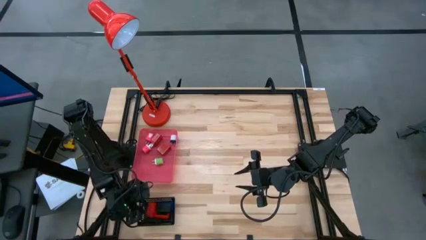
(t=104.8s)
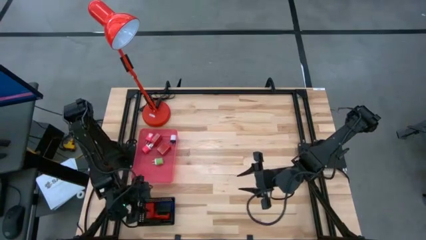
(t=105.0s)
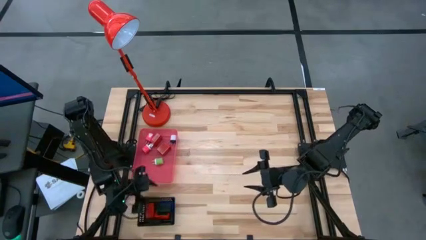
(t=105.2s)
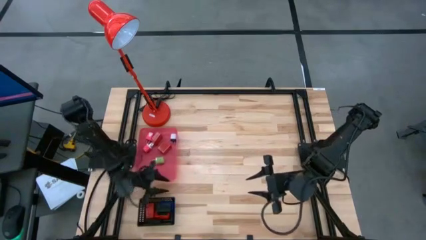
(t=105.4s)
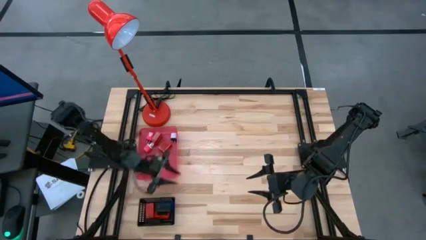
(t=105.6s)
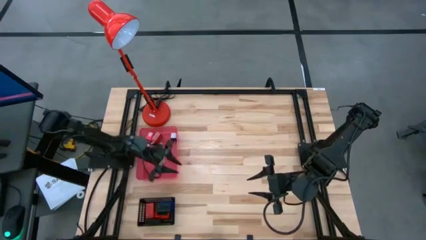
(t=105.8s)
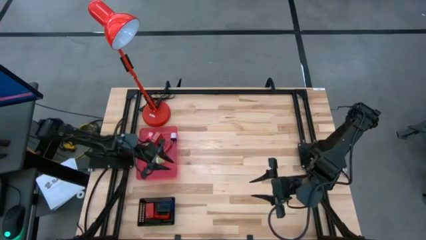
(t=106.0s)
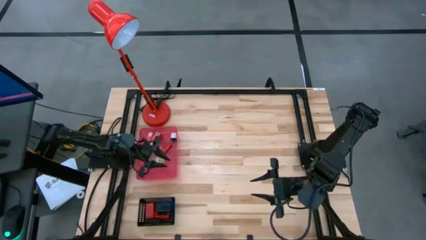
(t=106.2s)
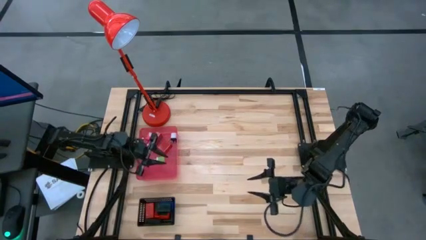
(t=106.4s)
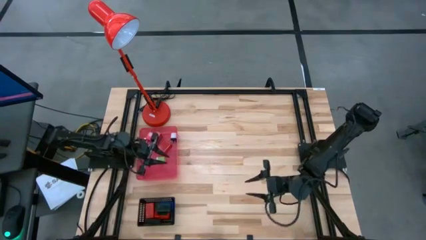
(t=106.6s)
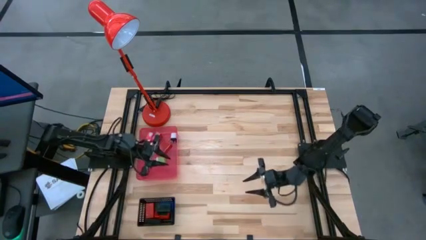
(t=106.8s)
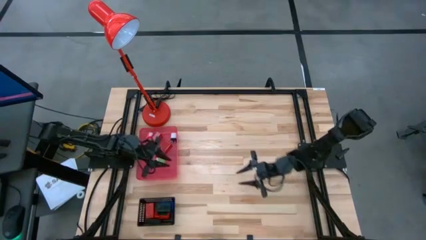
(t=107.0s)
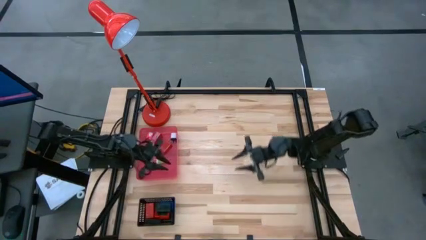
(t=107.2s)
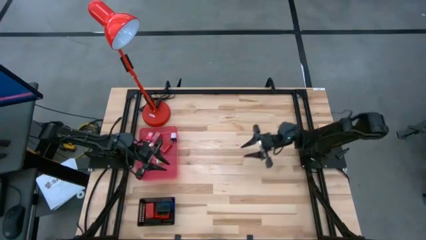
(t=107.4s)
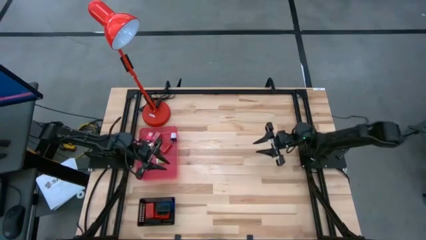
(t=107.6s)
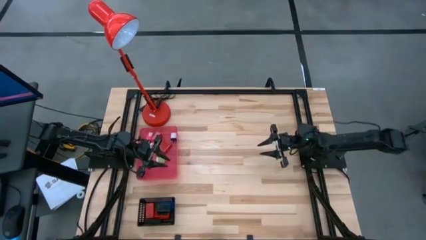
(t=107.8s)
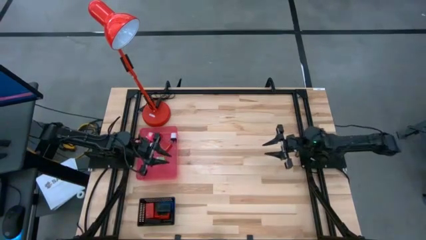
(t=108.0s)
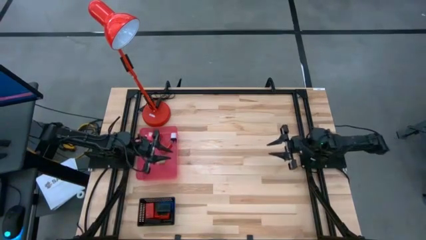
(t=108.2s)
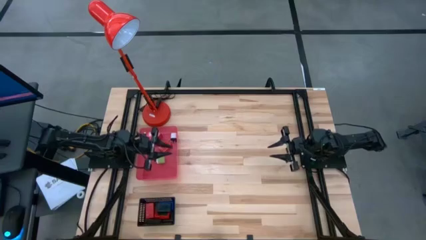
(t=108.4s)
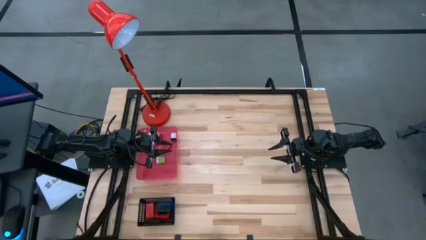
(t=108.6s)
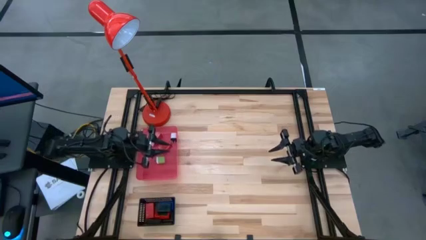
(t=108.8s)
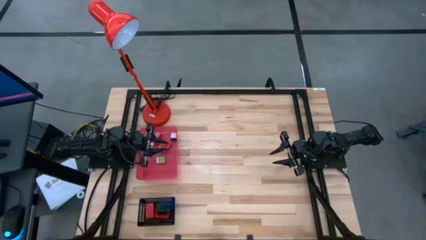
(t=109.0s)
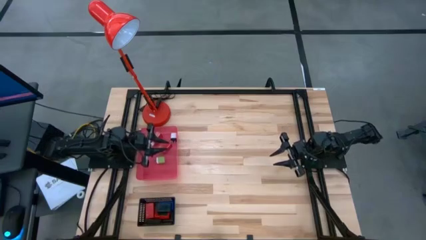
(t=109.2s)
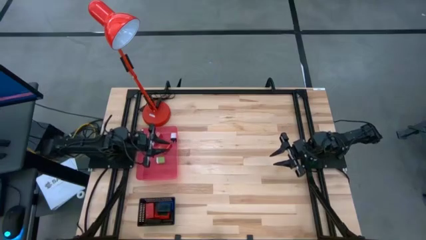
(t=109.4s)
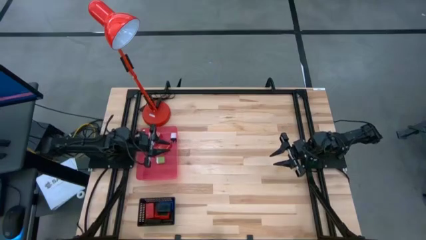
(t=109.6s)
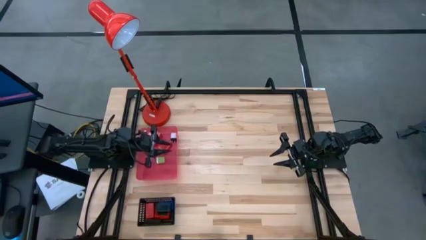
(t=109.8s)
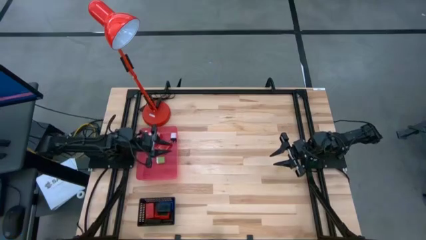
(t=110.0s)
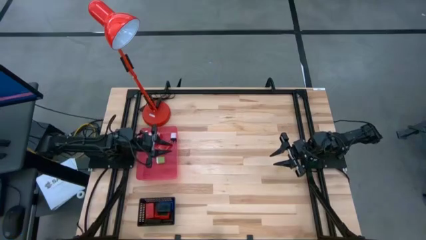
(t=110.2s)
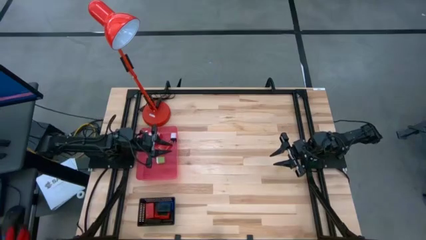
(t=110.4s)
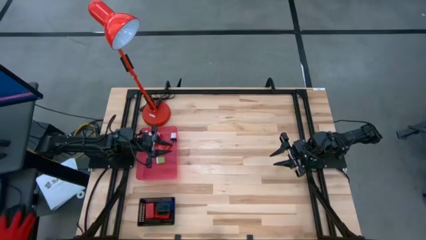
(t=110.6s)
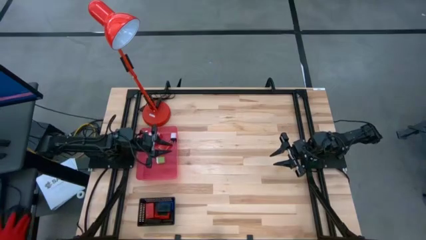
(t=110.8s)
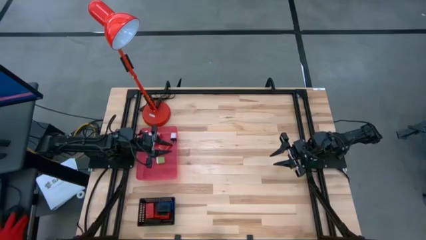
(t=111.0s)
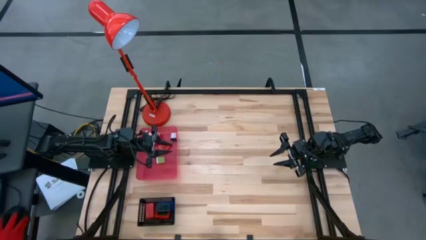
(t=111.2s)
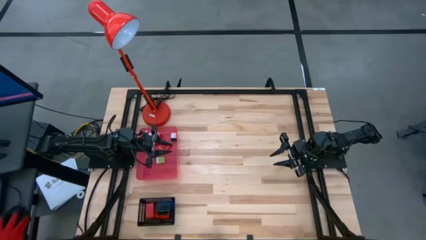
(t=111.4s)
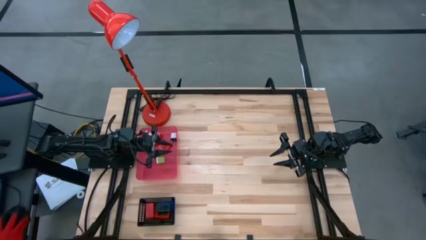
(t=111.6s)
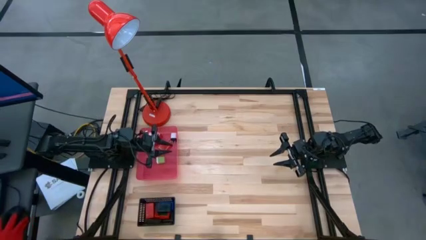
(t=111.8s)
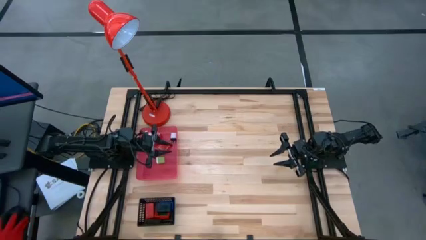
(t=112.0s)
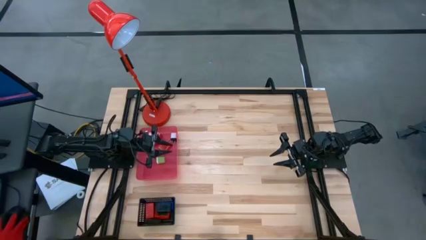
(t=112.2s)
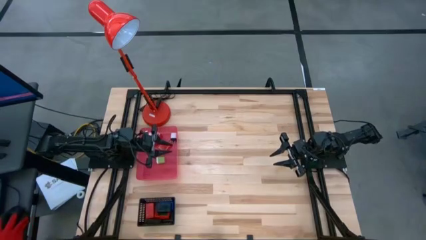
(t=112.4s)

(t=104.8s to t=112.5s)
Task: Pick & Place Office items
Return to Home Position

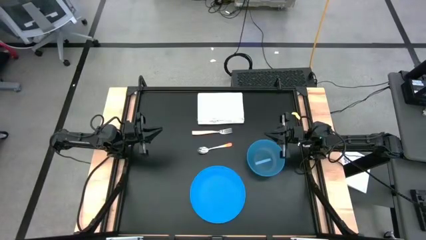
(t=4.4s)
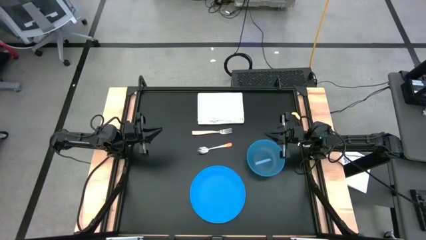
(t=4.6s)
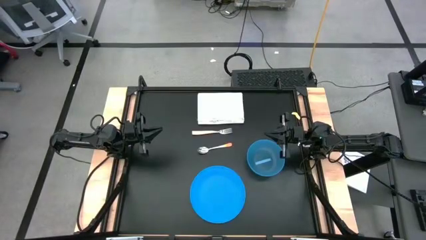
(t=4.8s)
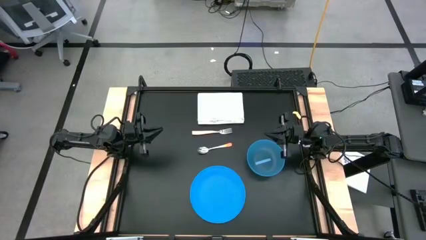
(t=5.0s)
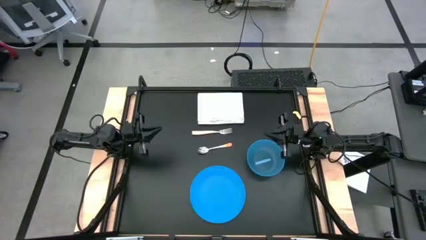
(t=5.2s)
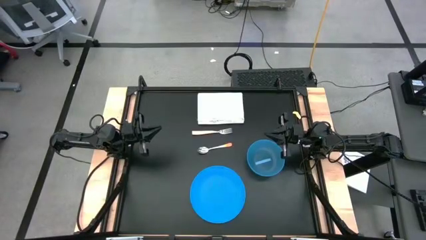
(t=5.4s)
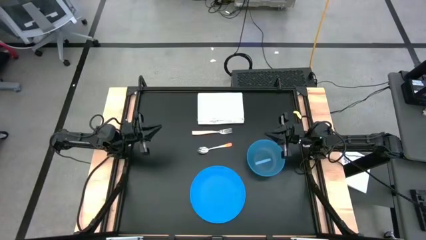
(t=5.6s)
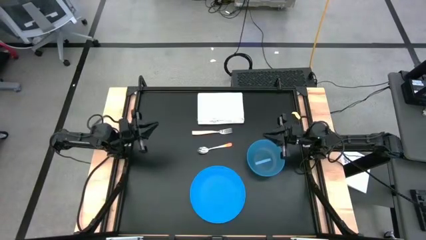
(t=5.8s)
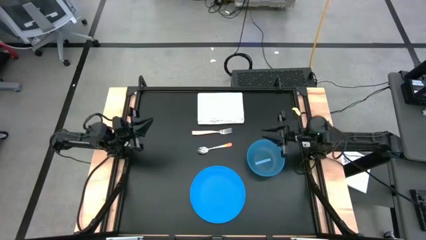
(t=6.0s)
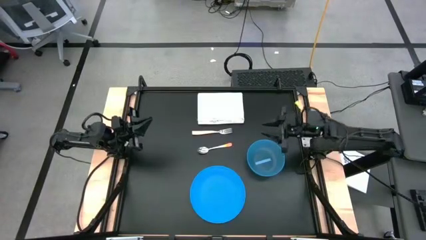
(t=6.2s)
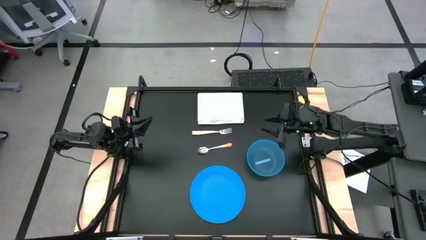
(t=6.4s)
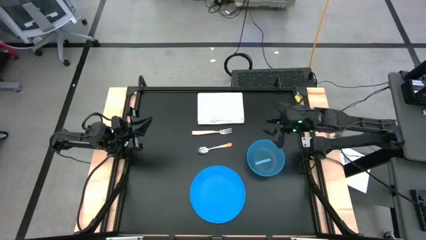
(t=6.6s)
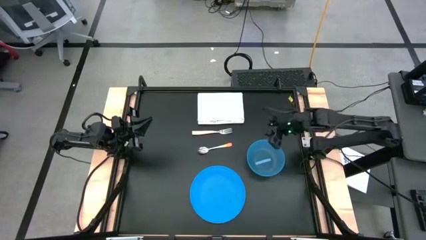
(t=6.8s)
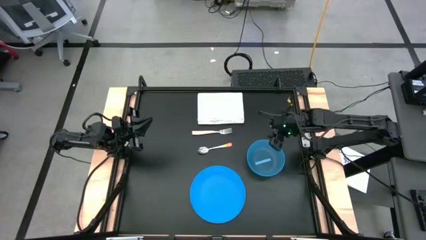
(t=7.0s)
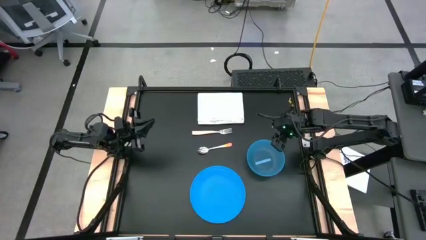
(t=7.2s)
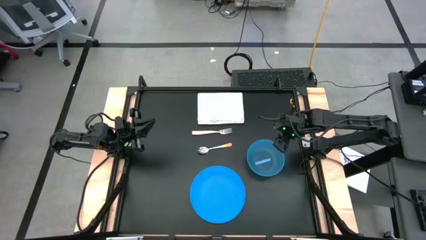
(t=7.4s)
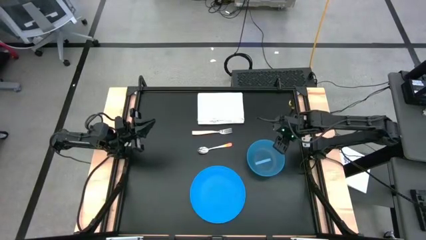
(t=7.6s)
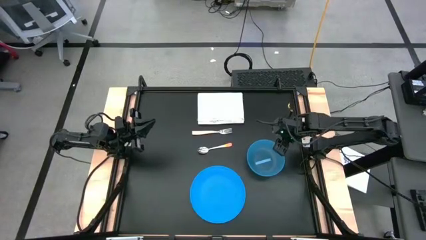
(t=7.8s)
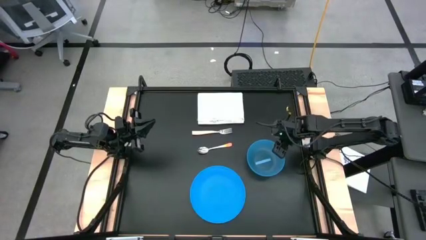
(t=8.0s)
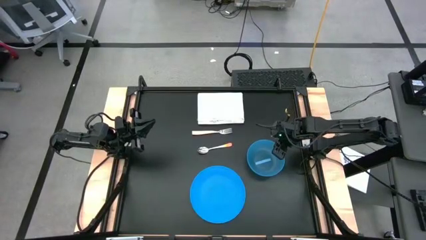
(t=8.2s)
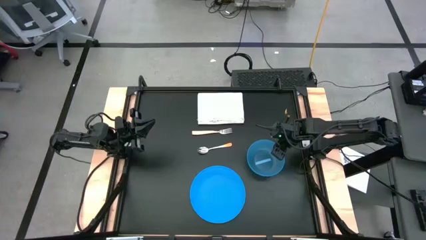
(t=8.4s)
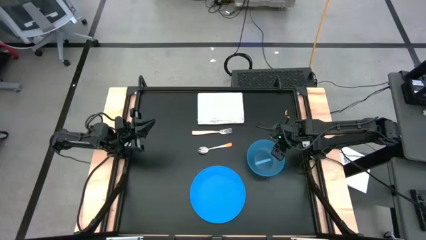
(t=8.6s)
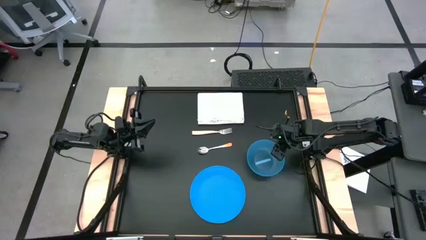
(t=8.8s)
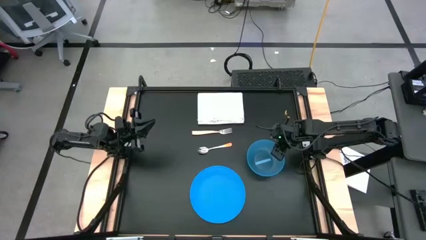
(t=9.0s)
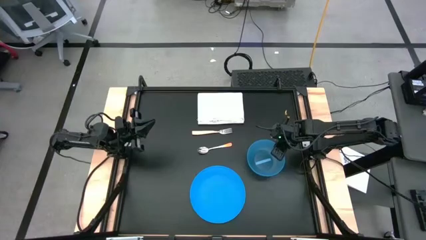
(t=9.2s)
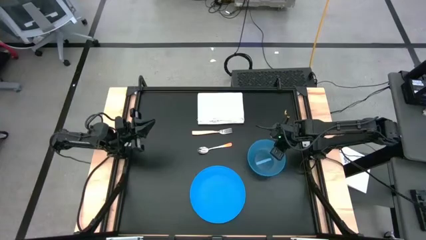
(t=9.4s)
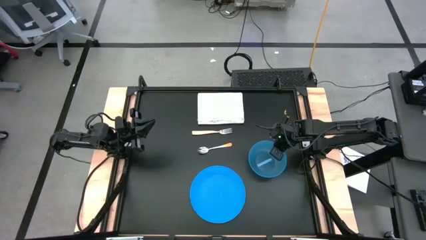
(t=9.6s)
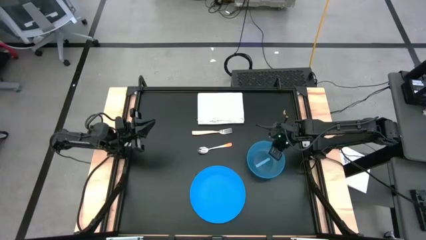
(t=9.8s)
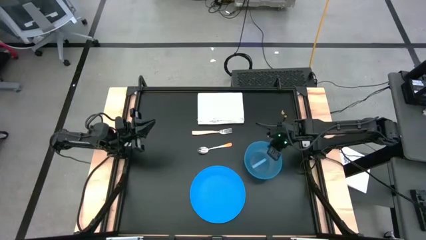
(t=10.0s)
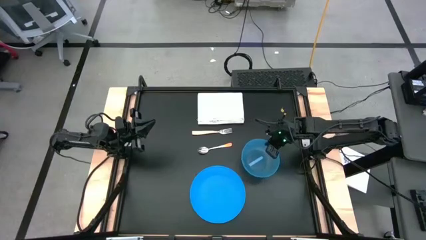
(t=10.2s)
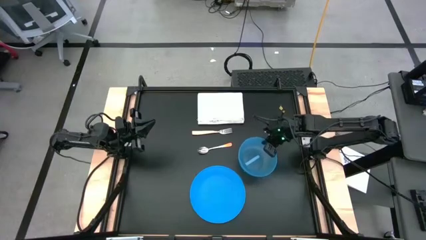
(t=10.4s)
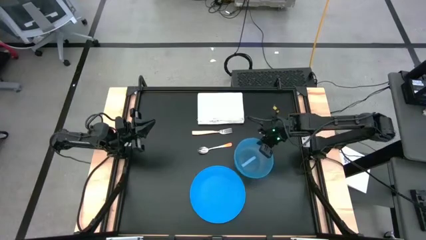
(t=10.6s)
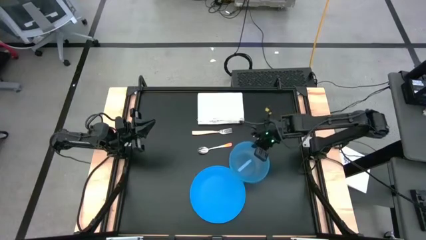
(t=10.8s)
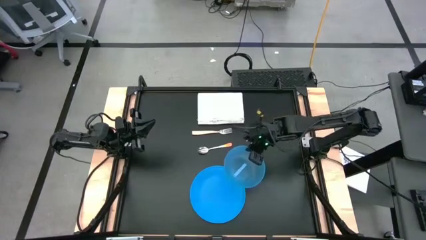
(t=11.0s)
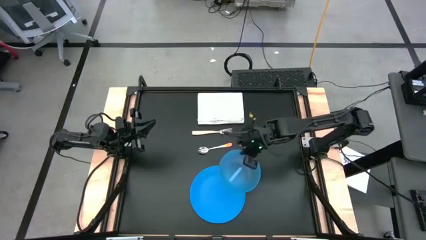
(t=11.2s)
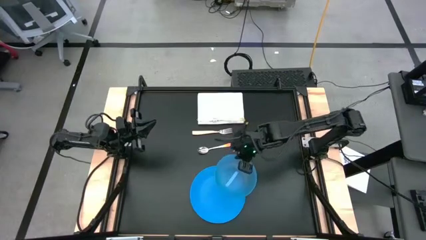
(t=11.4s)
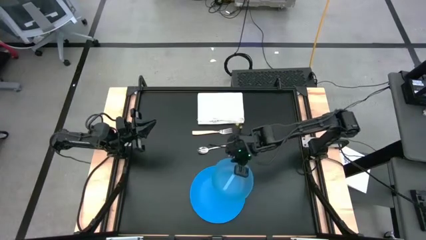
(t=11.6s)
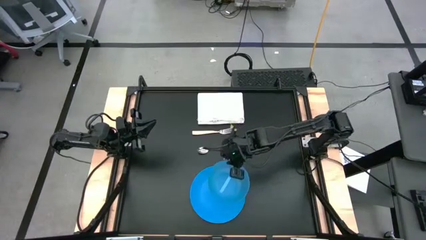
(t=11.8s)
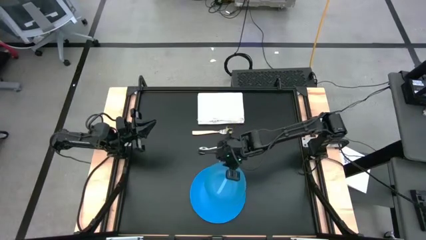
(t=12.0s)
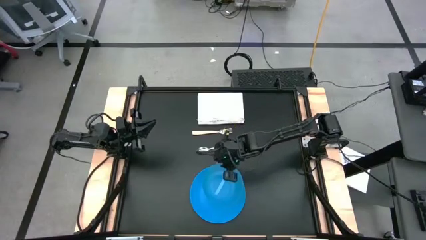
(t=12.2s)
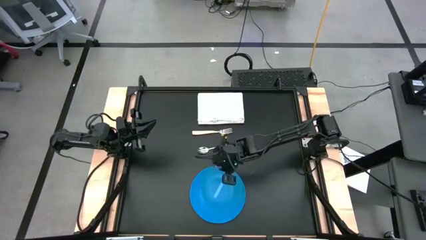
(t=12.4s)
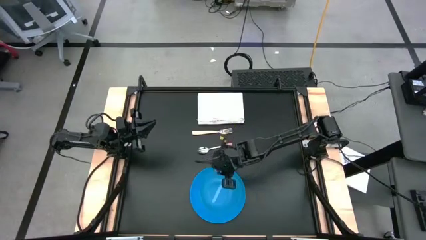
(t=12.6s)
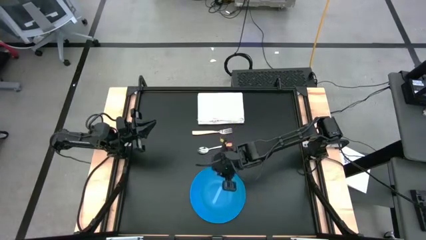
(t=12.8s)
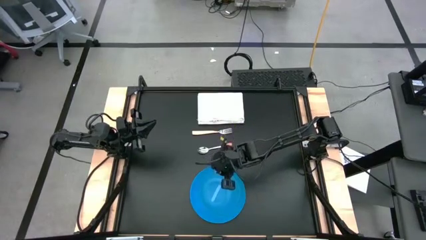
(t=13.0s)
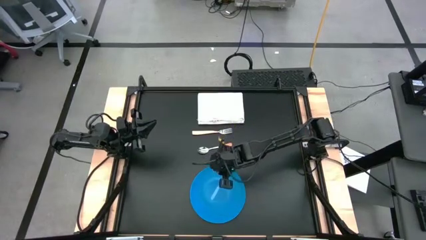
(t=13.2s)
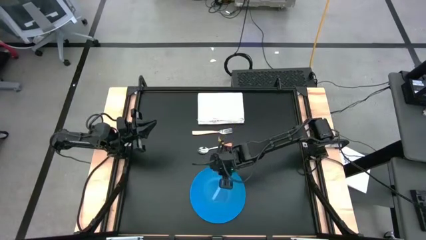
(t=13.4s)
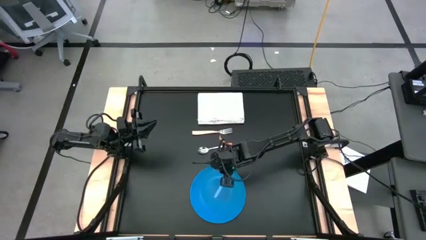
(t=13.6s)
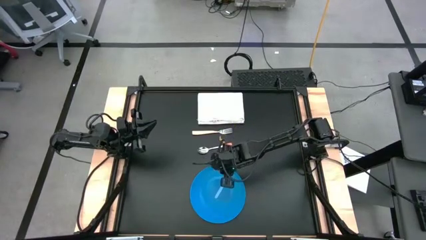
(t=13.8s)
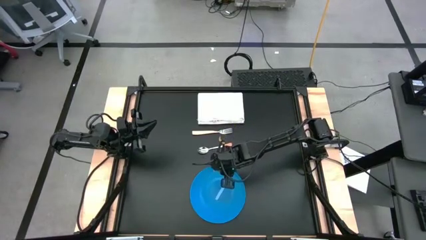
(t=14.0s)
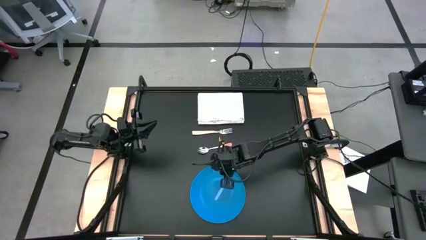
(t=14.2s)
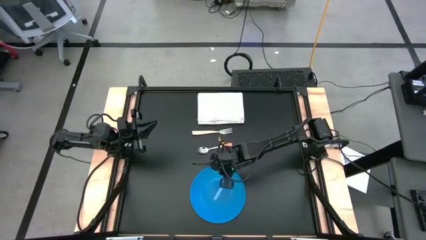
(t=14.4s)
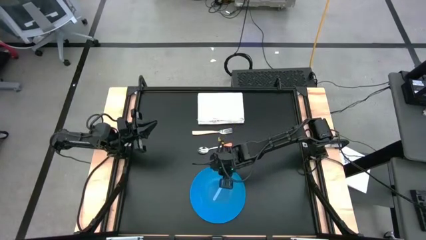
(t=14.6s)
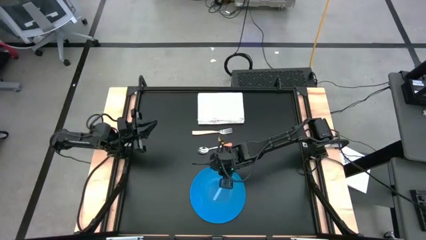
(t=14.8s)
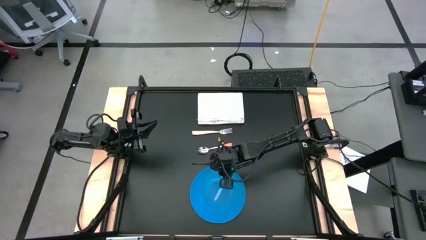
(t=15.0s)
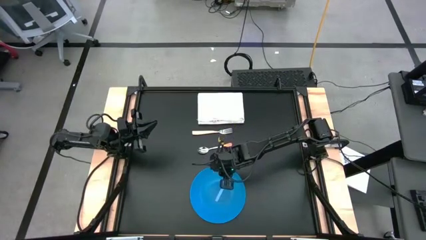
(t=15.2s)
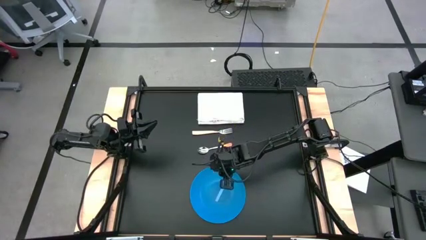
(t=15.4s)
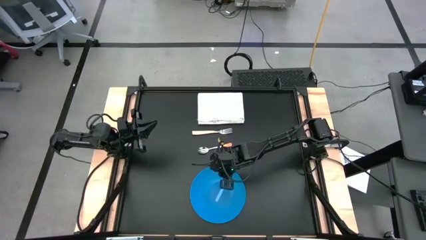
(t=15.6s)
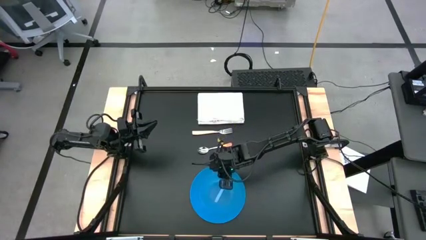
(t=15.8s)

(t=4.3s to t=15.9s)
Task: Set table place
Put the blue bowl into the center of the blue plate
